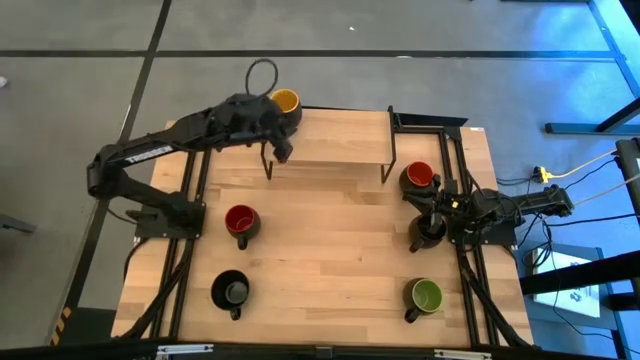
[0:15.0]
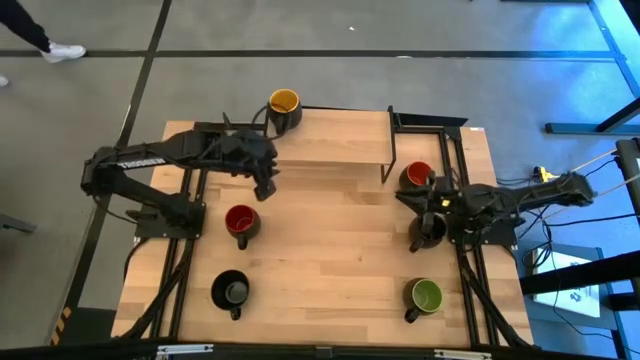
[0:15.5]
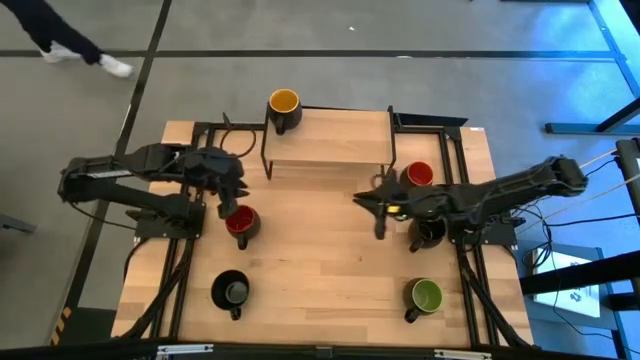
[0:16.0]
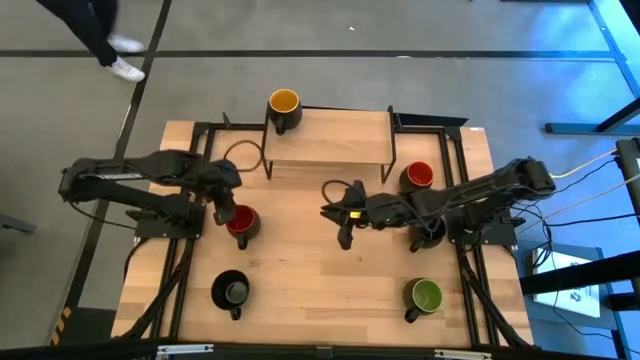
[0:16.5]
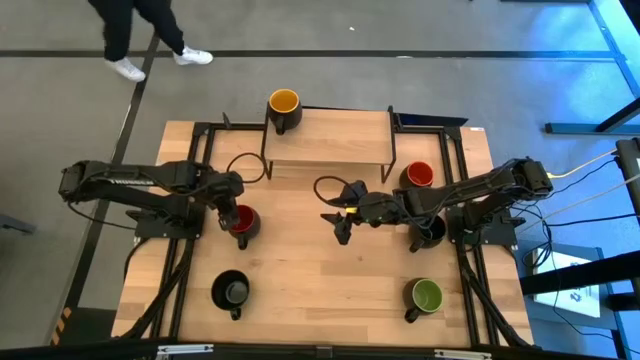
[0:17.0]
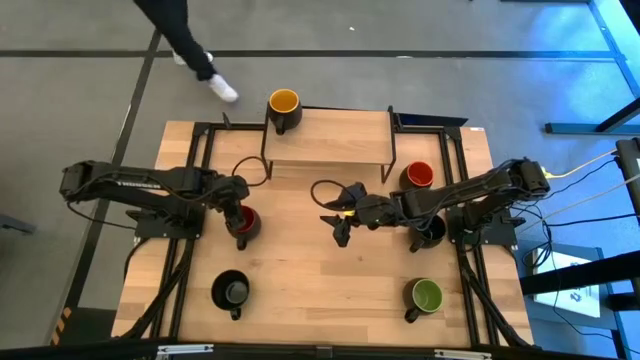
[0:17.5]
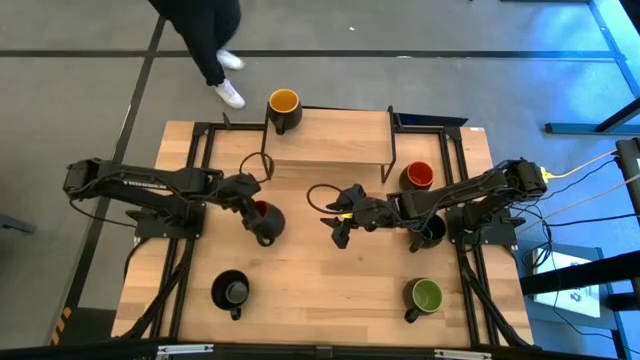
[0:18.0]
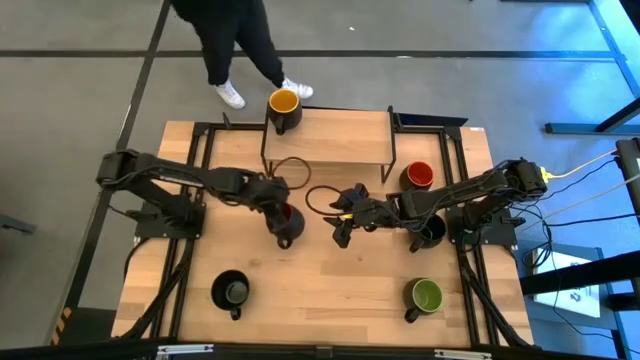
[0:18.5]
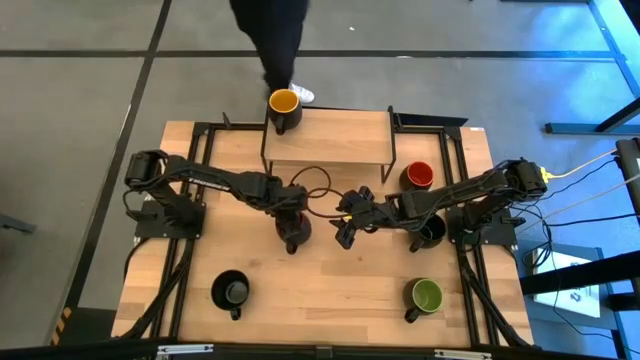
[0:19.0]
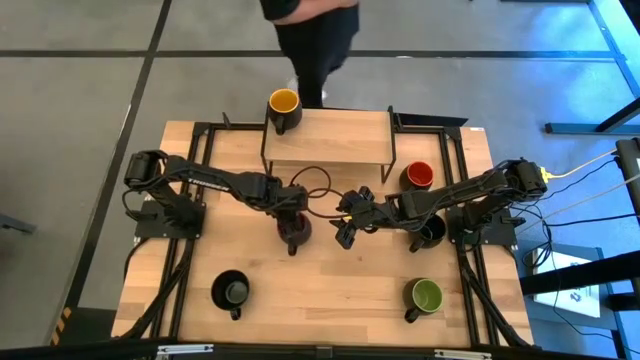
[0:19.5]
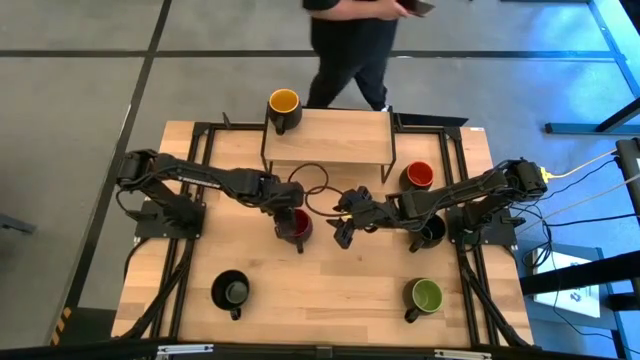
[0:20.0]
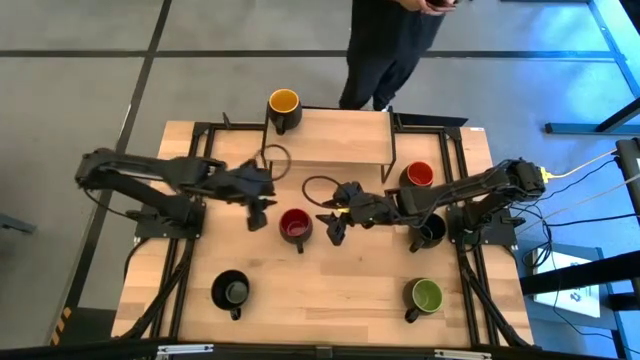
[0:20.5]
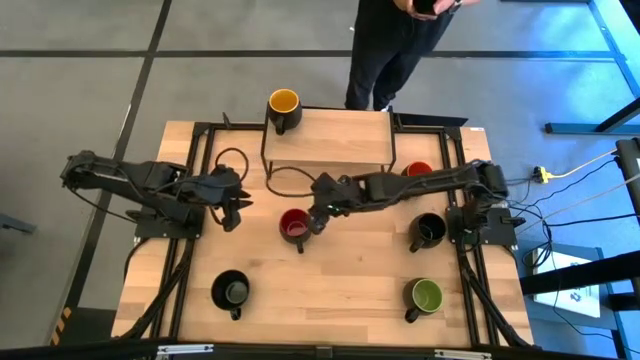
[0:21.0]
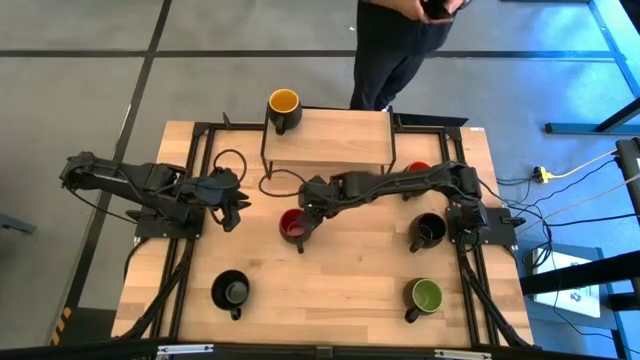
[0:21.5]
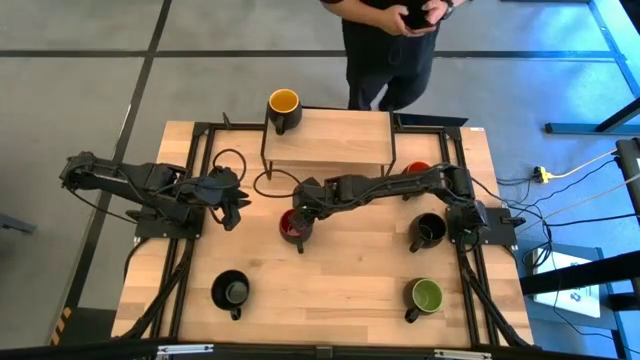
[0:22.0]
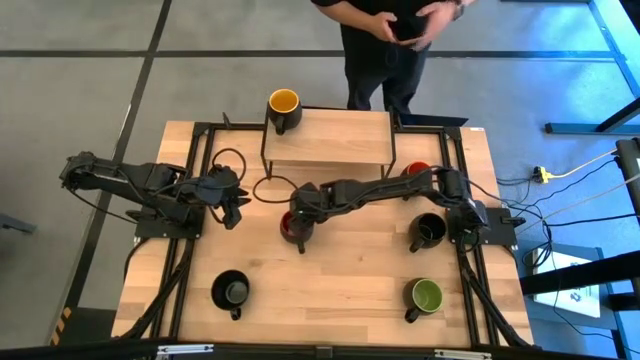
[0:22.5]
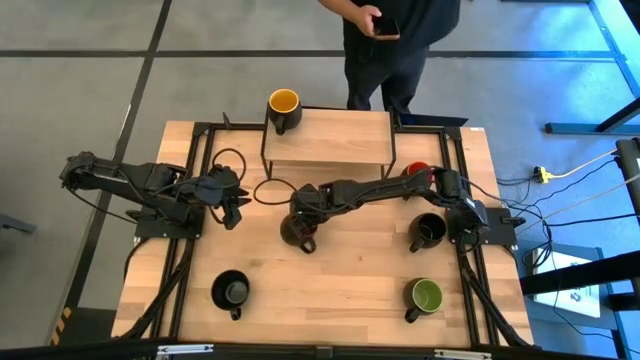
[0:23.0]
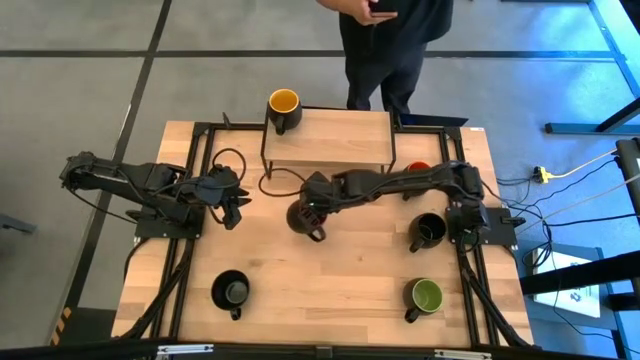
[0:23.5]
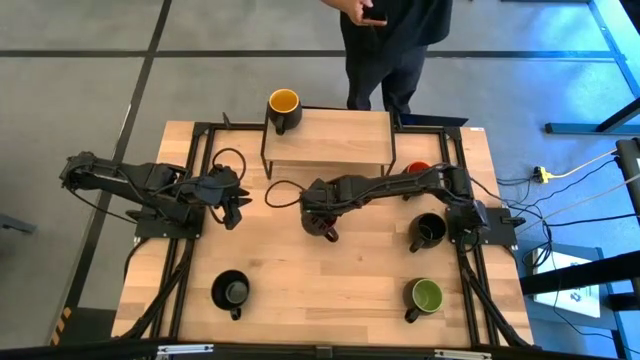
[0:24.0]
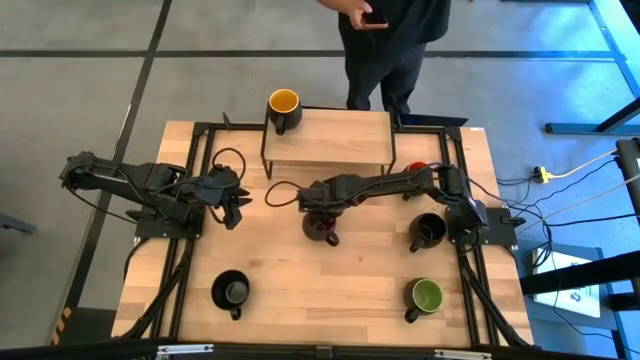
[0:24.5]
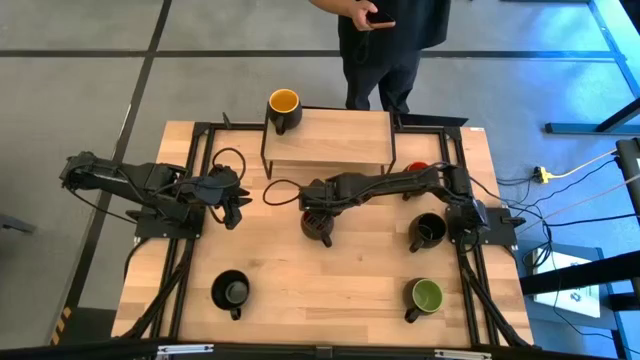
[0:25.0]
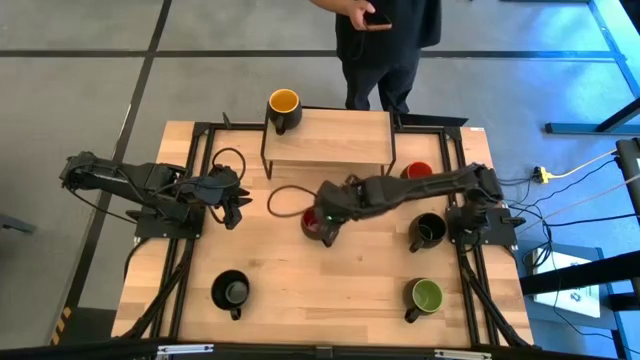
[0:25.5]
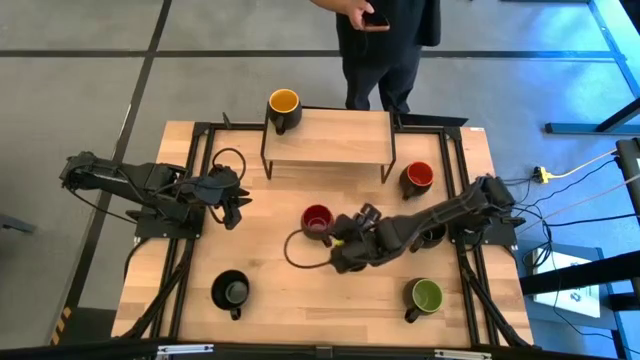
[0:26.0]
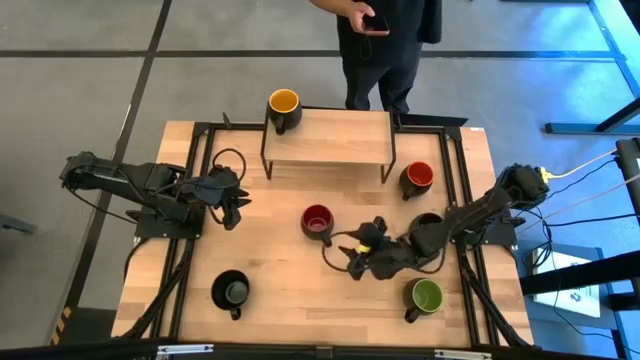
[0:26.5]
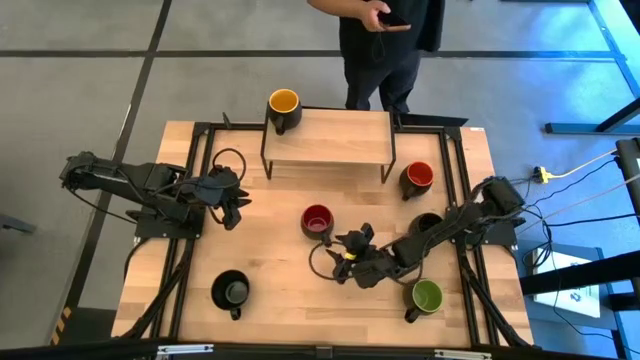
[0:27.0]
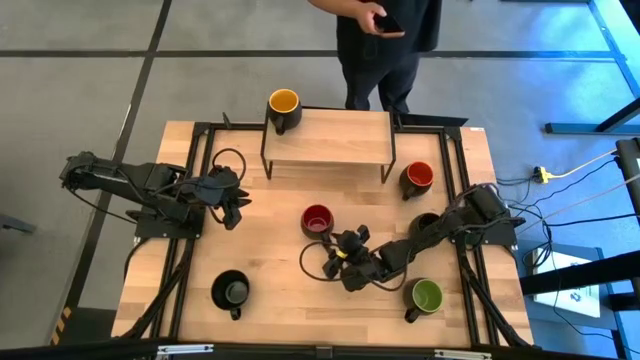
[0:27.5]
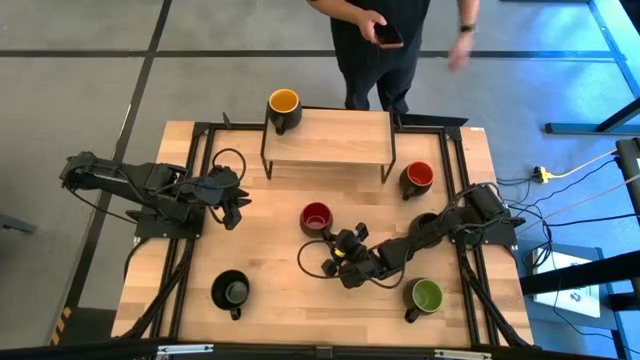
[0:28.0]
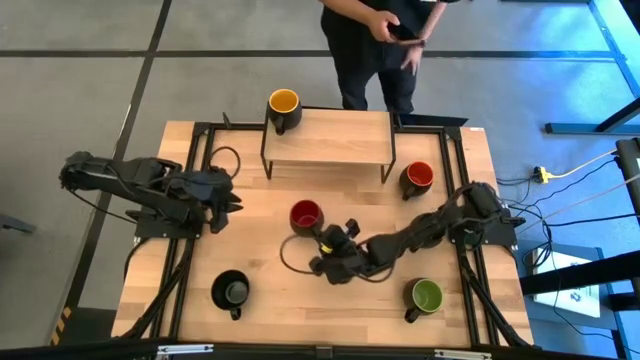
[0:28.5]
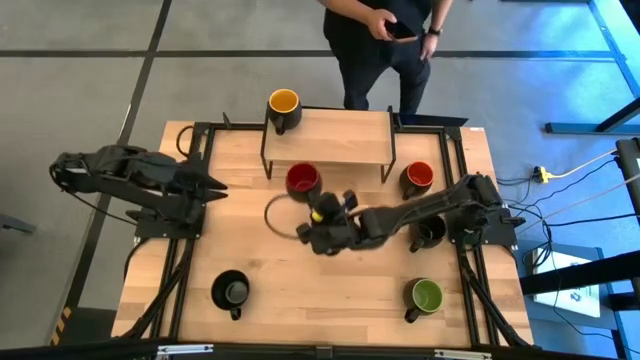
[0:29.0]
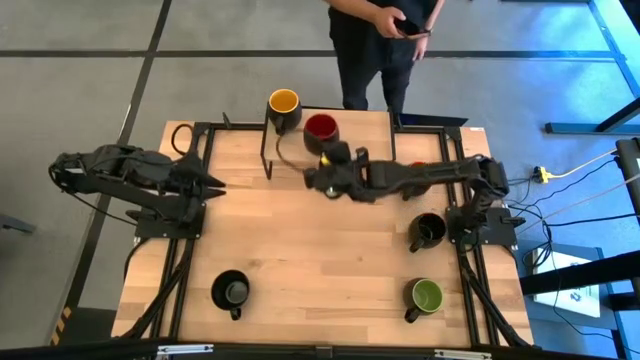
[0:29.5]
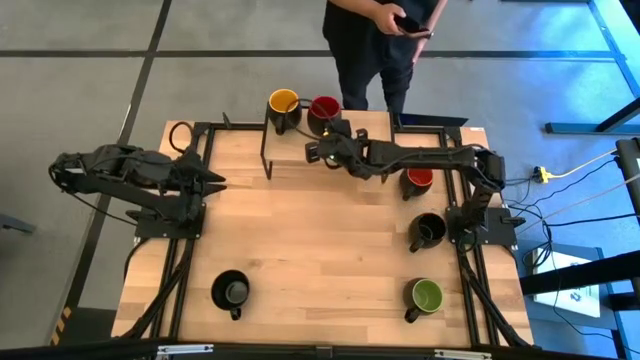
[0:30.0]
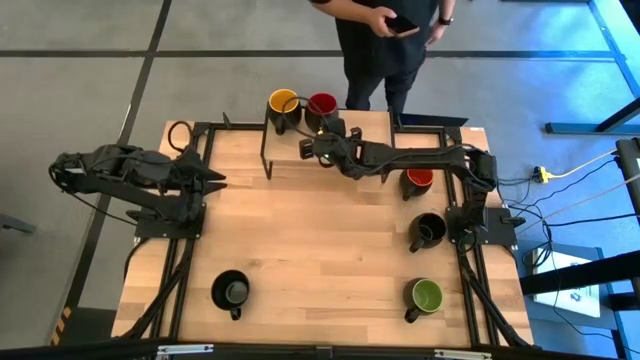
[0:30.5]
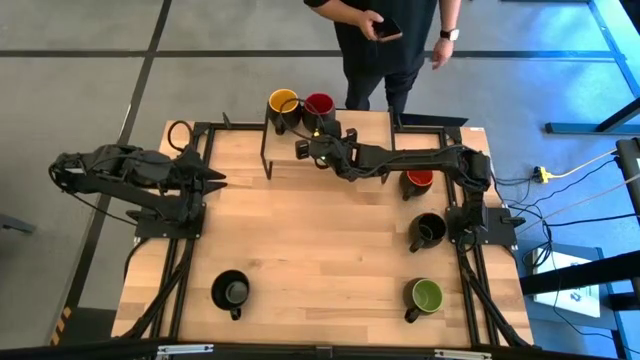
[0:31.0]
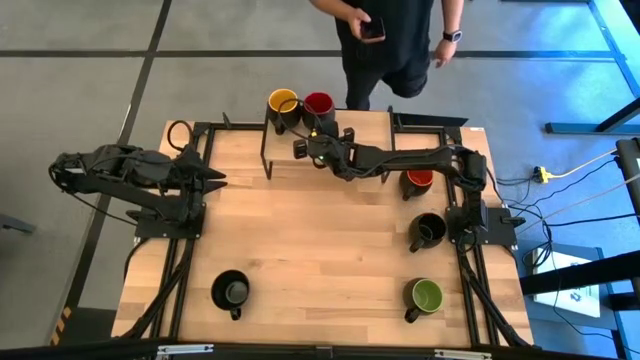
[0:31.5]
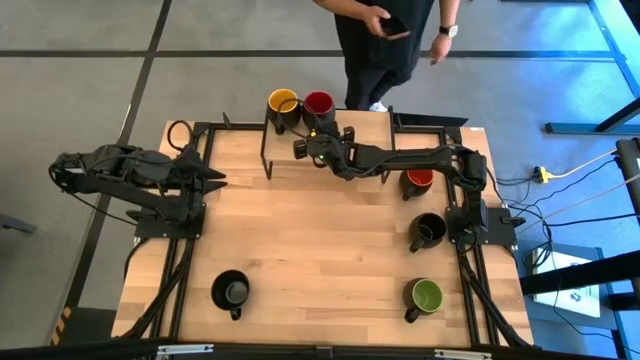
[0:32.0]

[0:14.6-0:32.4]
Task: Place coffee mugs
Put the red mug on the shelf

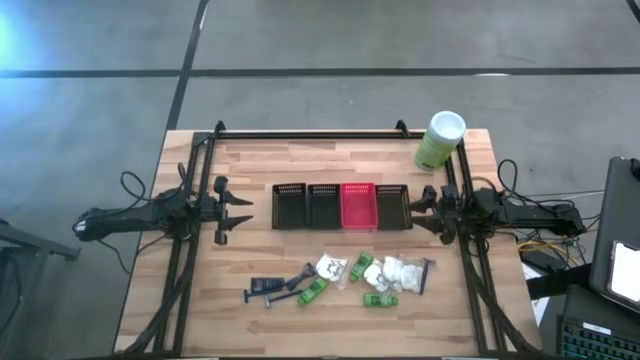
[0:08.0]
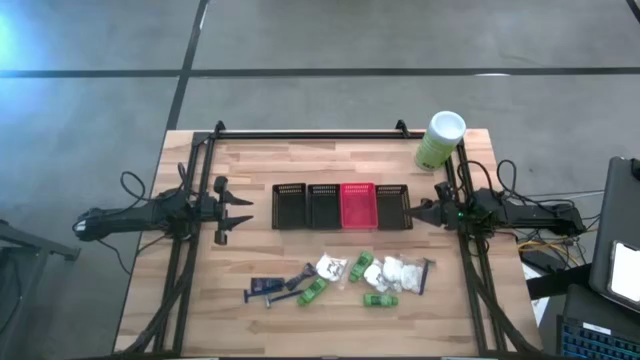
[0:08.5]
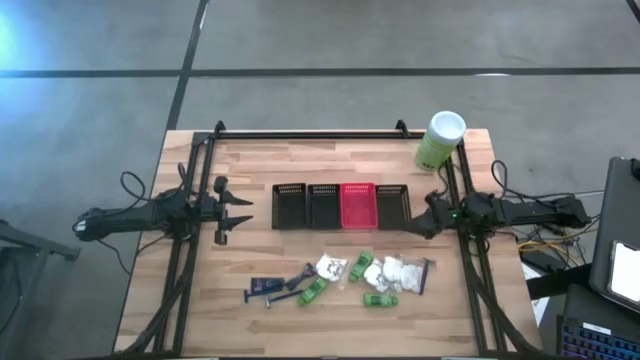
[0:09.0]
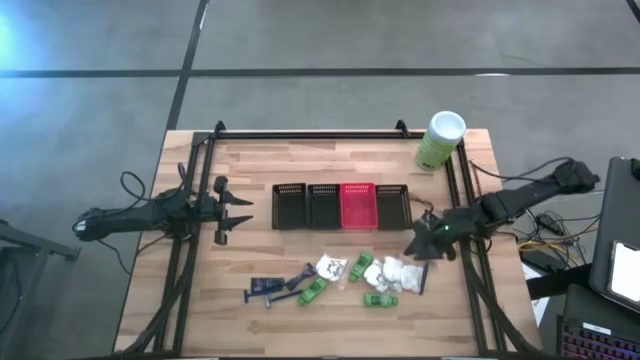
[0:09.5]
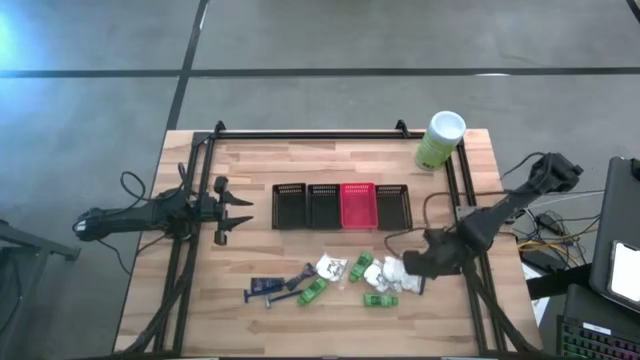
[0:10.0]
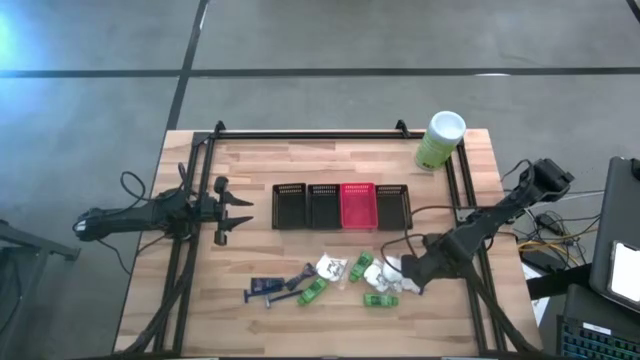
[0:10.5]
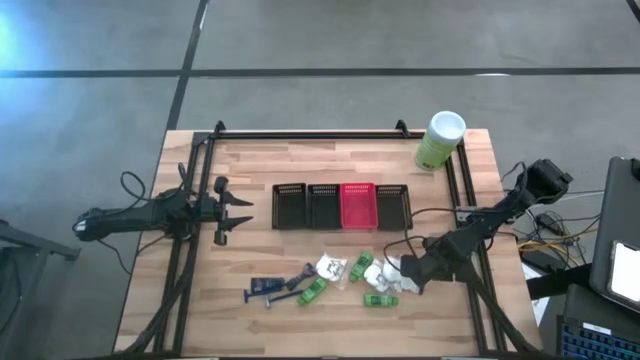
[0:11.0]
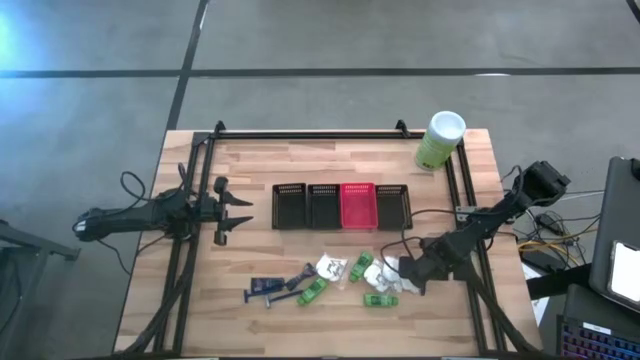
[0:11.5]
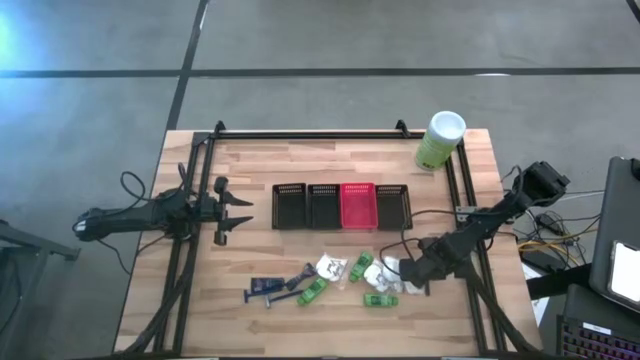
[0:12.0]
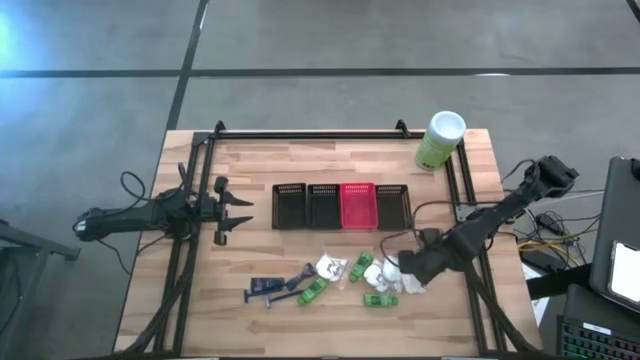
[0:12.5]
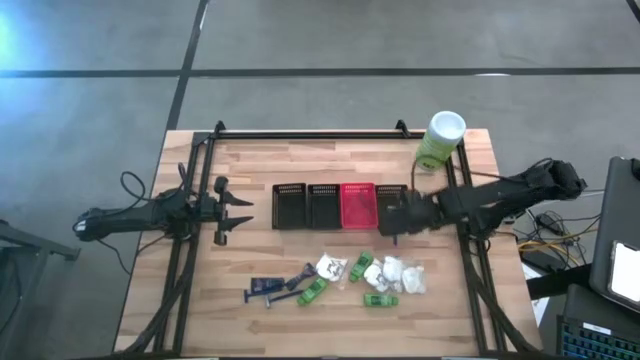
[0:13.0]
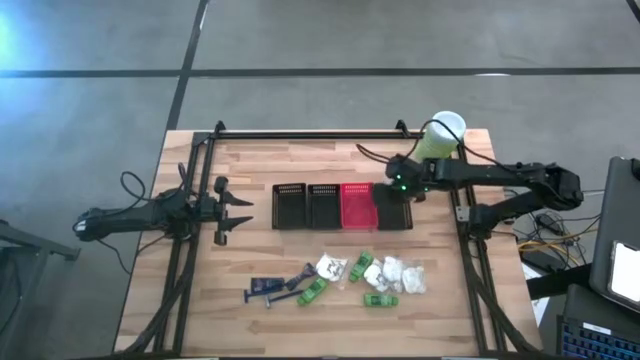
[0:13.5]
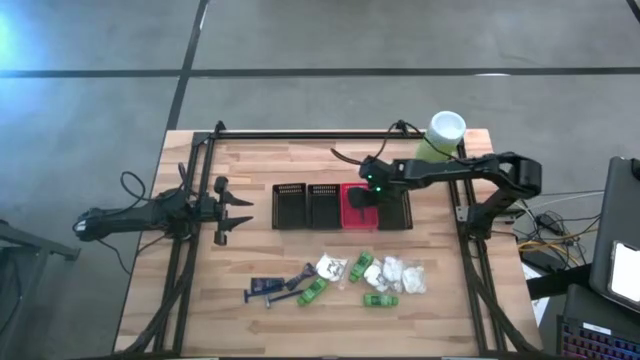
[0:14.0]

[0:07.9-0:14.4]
Task: Pick & Place Travel size toiletries
Put the blue razor into the orange basket
